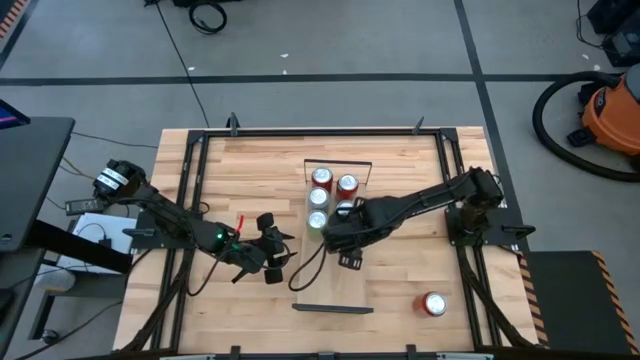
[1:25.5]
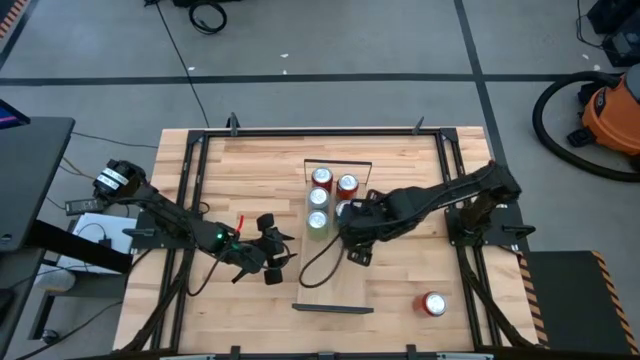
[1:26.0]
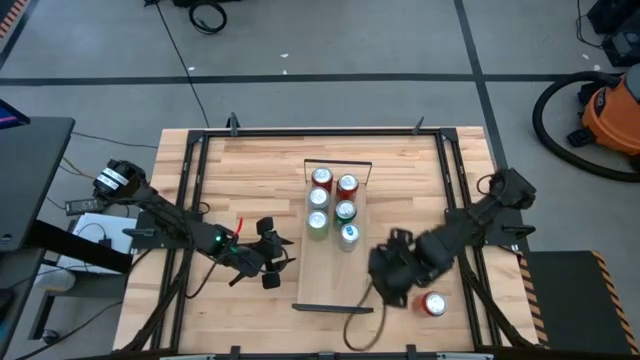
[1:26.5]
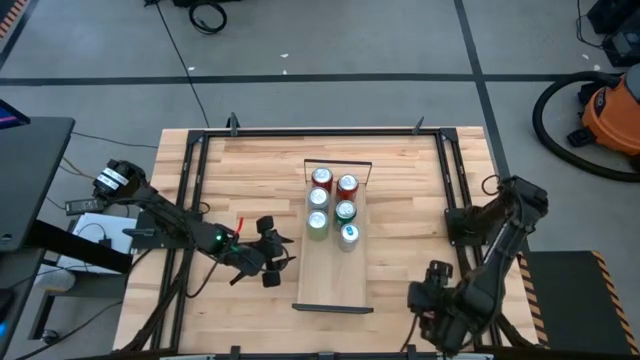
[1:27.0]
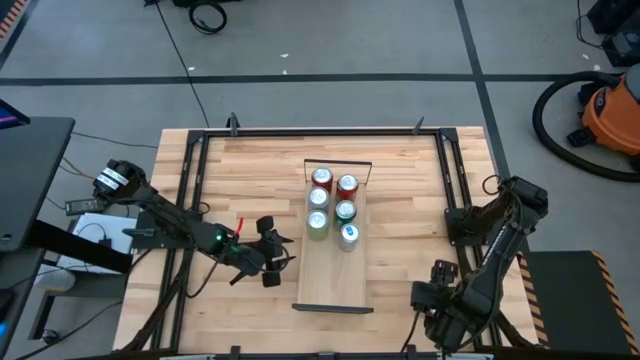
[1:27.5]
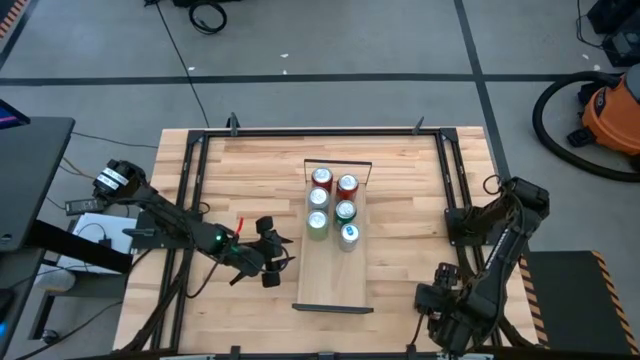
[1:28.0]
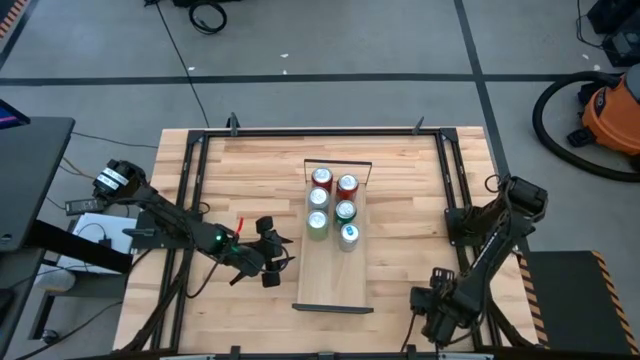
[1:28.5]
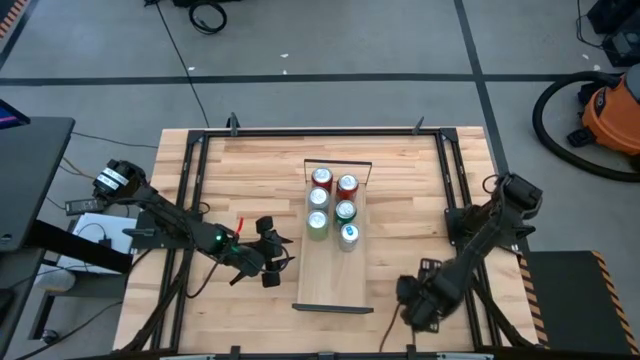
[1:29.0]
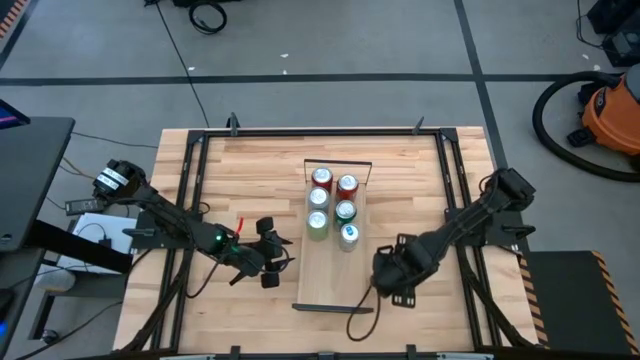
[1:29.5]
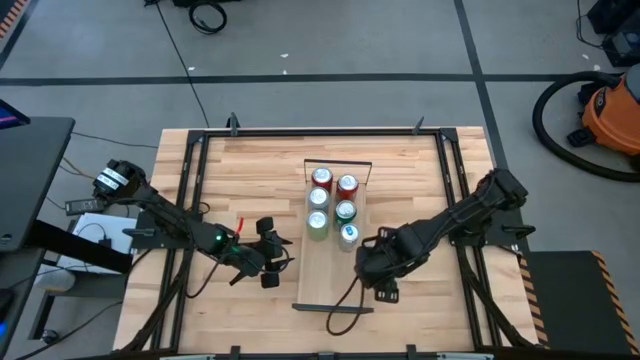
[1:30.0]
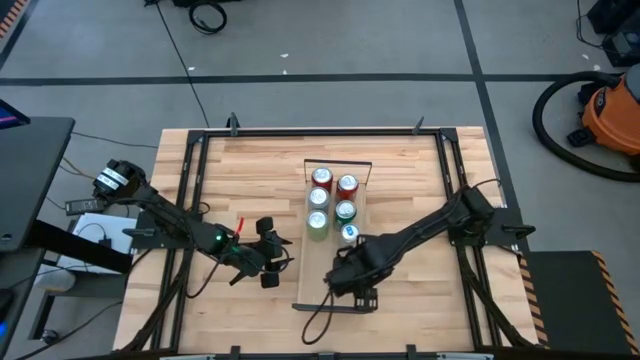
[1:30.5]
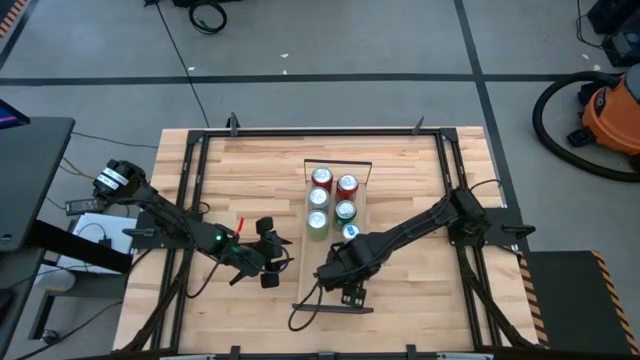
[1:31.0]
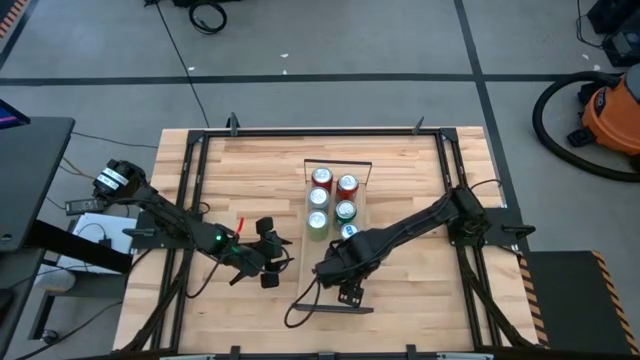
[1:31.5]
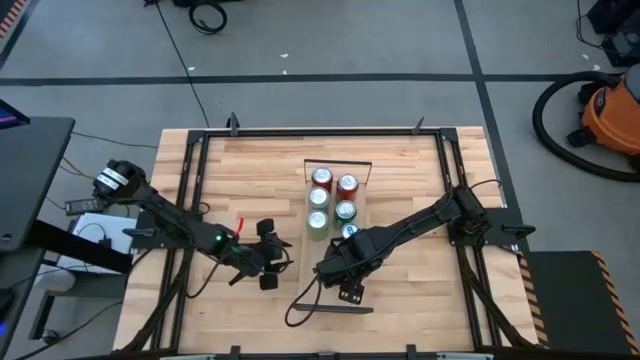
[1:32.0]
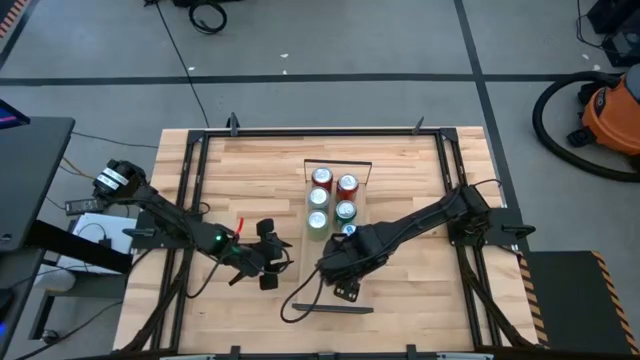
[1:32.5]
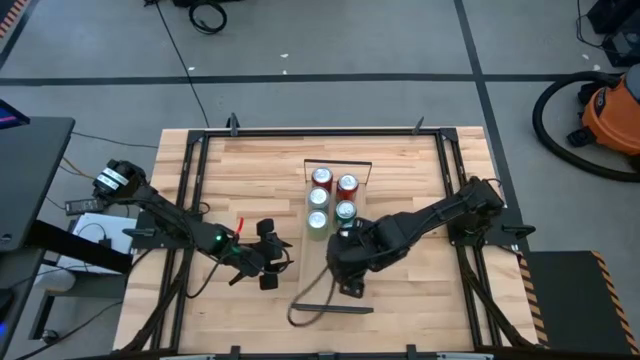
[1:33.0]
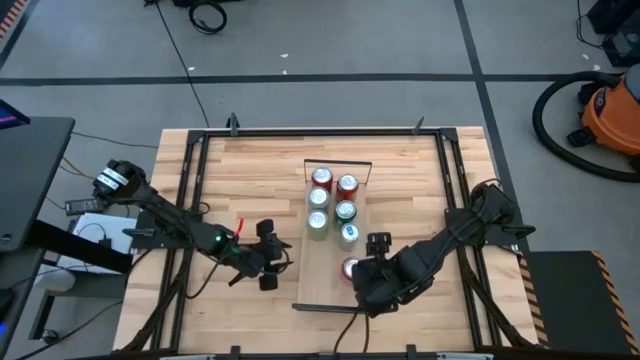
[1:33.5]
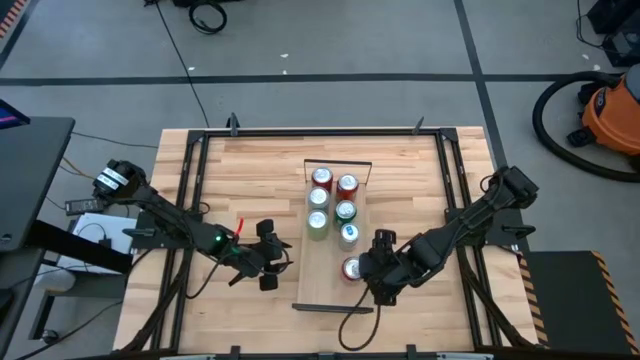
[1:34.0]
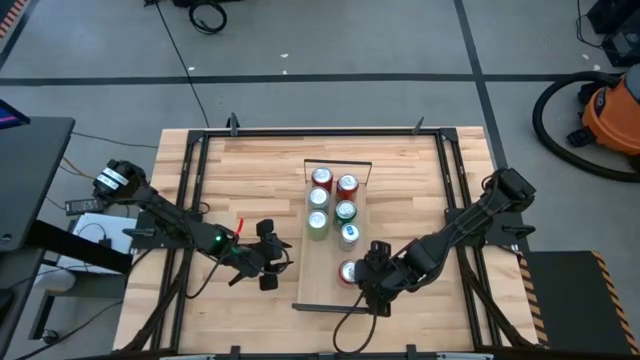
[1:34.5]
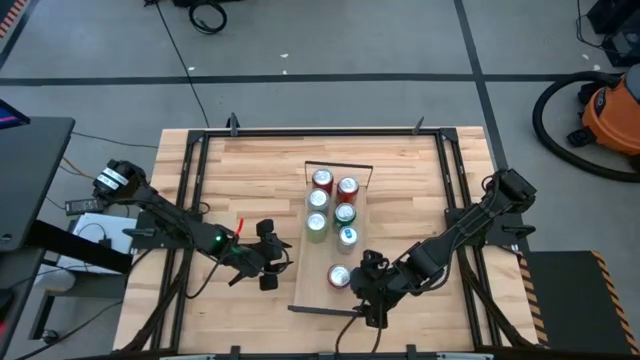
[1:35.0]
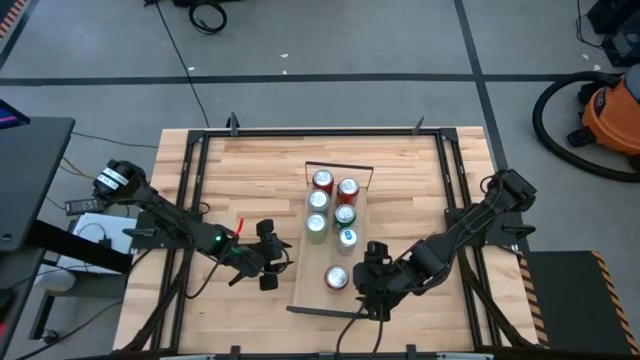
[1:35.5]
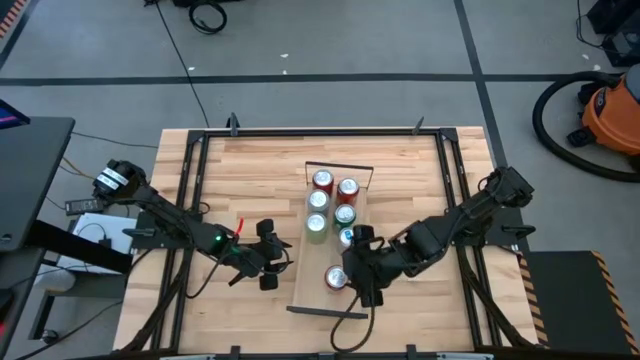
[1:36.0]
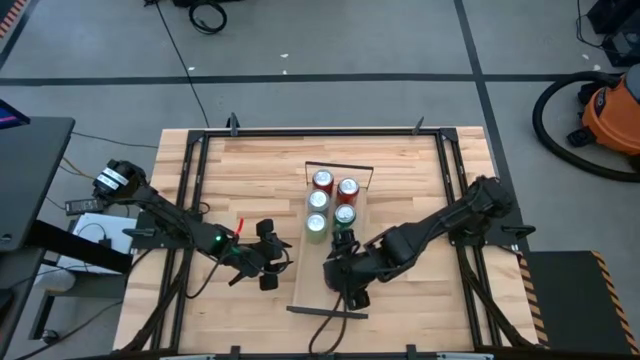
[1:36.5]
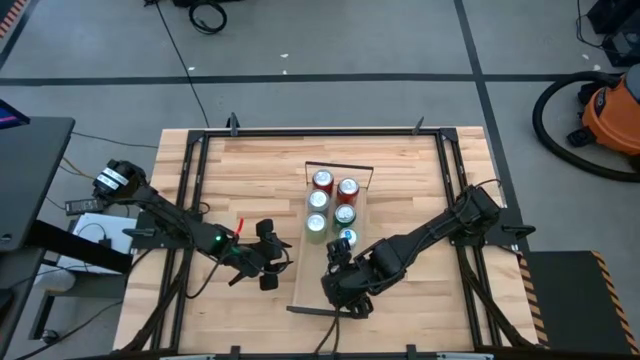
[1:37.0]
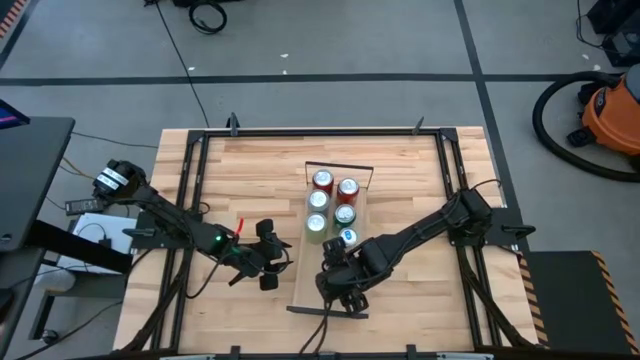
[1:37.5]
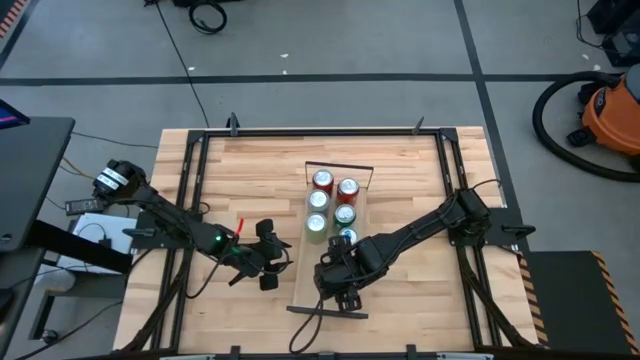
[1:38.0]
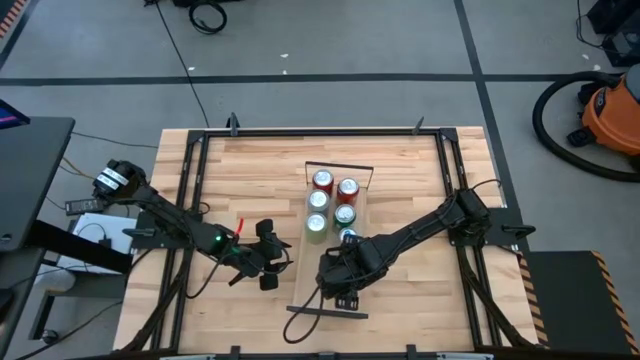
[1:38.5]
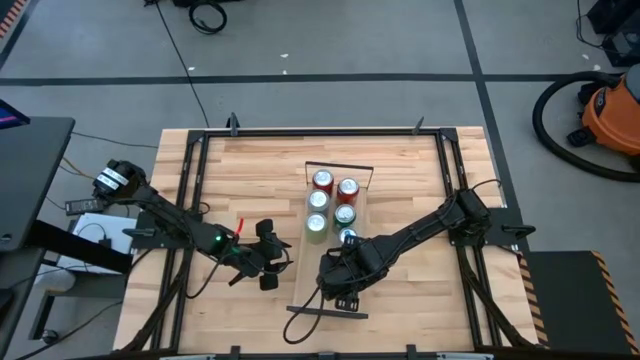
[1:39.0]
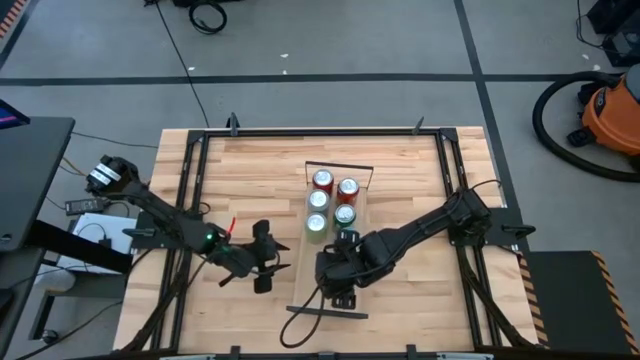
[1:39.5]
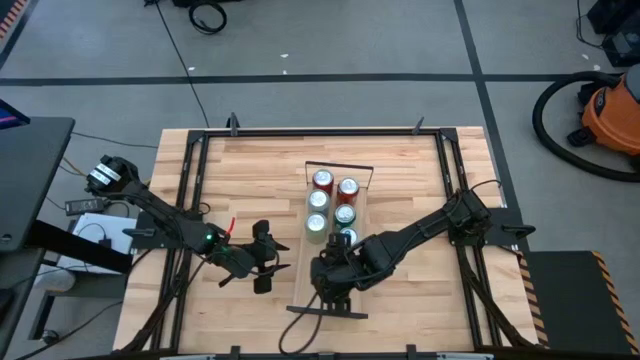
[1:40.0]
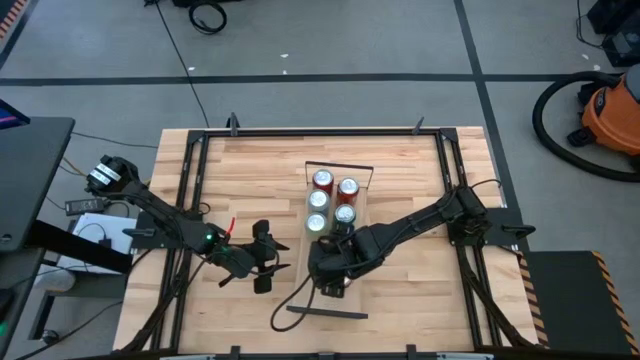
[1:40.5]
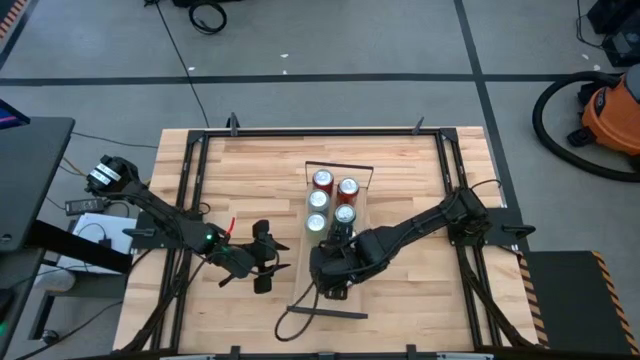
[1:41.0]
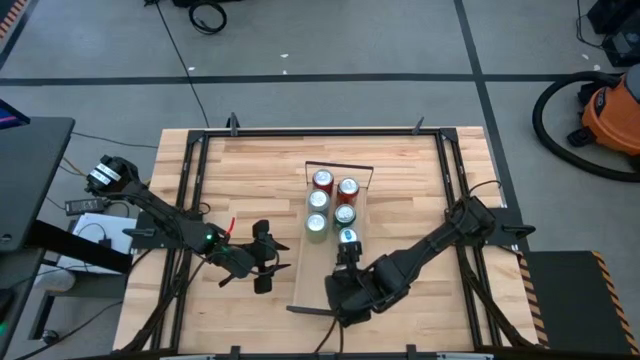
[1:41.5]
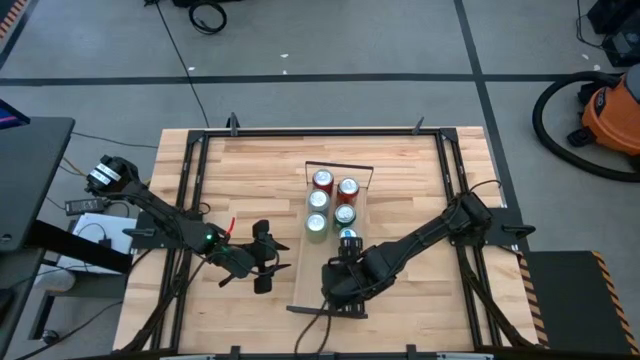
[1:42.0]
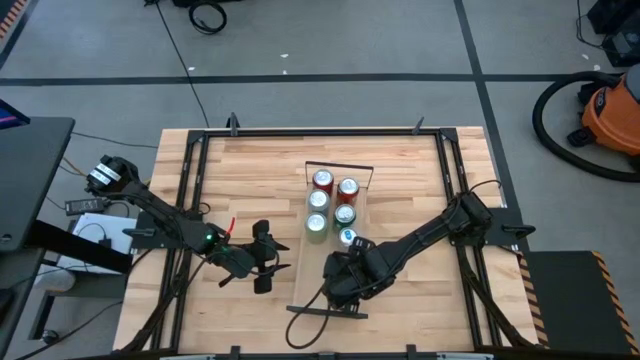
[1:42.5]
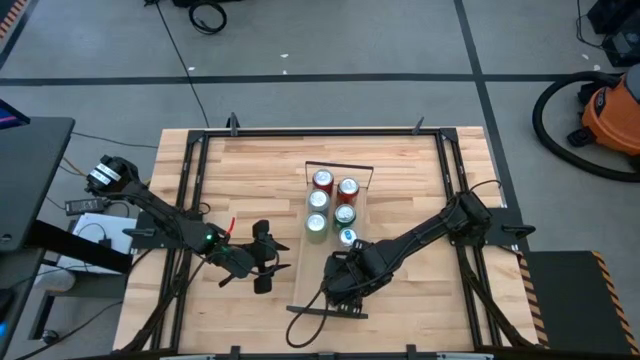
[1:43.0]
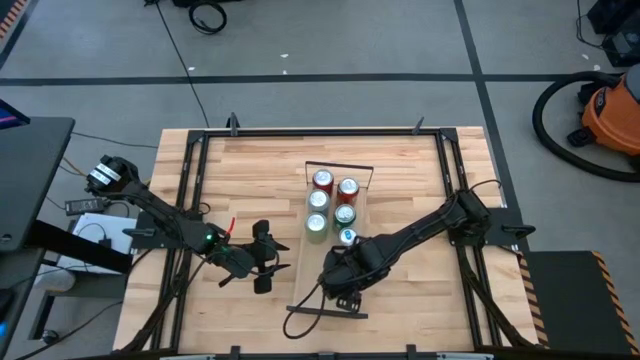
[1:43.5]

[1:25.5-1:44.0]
Task: Place canned beverage on shelf
Put the red soda can on the shelf
